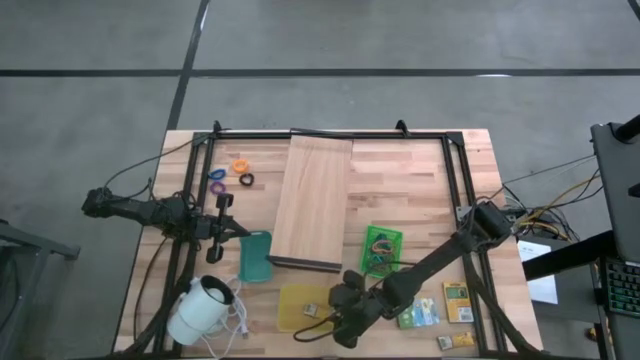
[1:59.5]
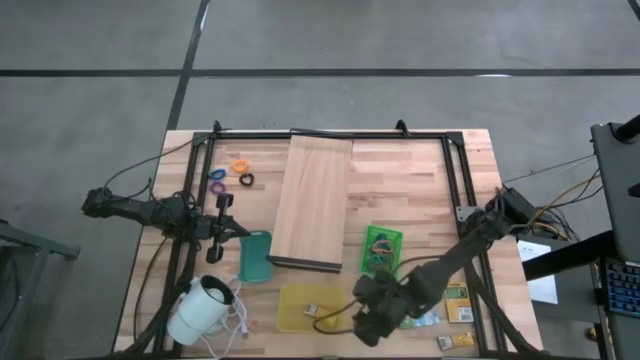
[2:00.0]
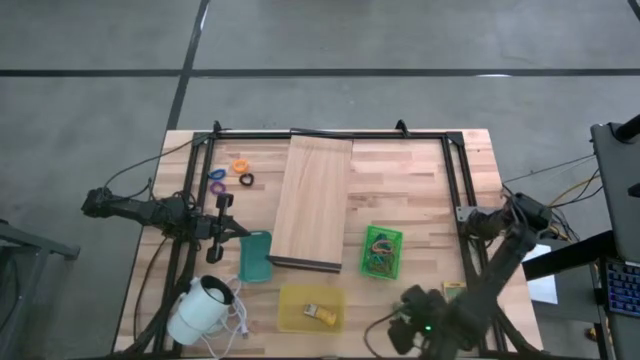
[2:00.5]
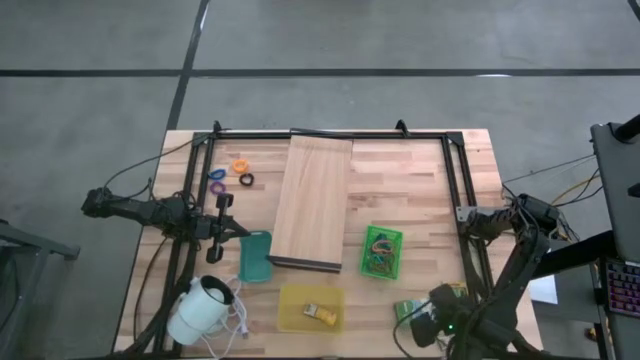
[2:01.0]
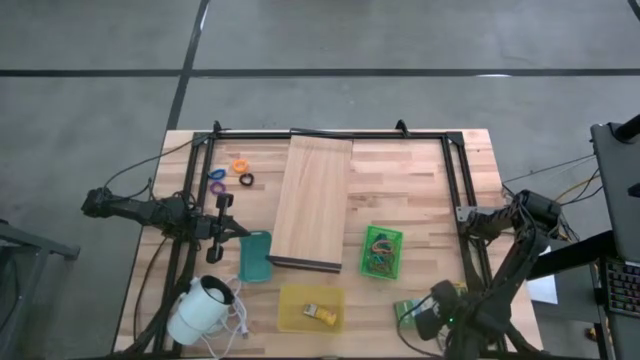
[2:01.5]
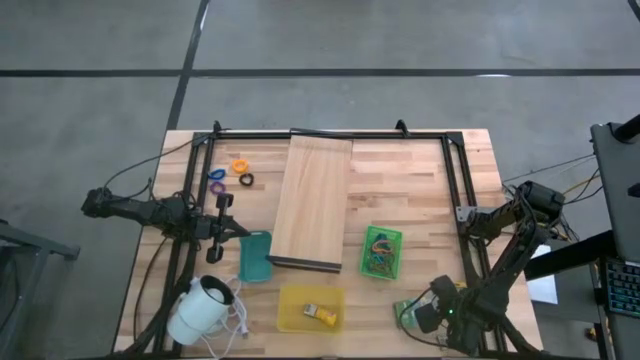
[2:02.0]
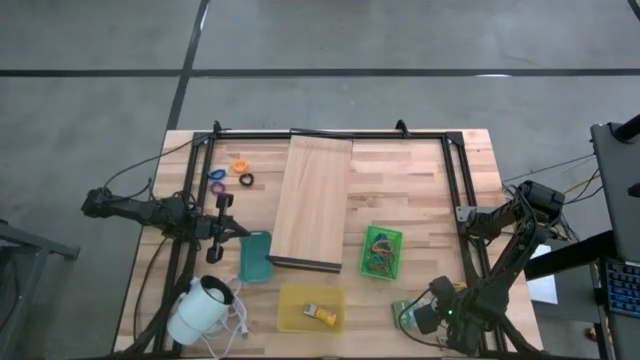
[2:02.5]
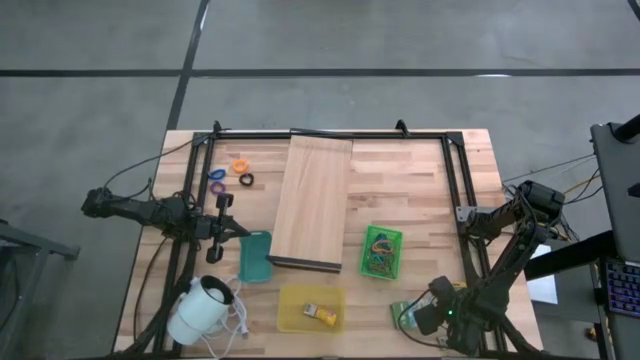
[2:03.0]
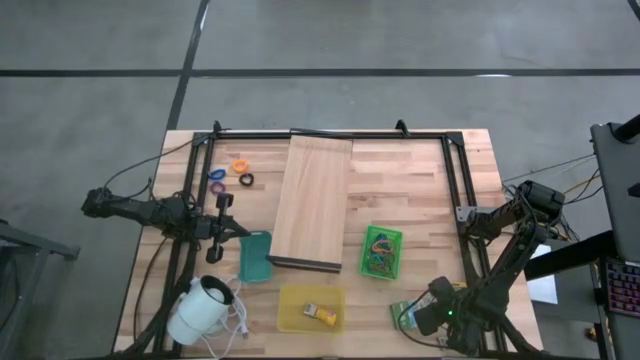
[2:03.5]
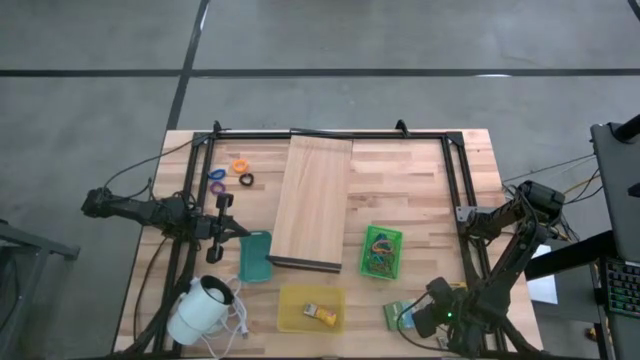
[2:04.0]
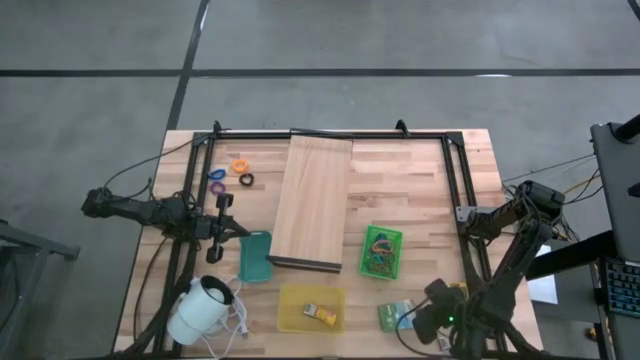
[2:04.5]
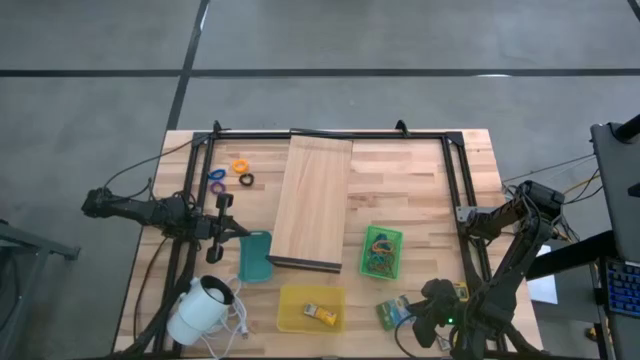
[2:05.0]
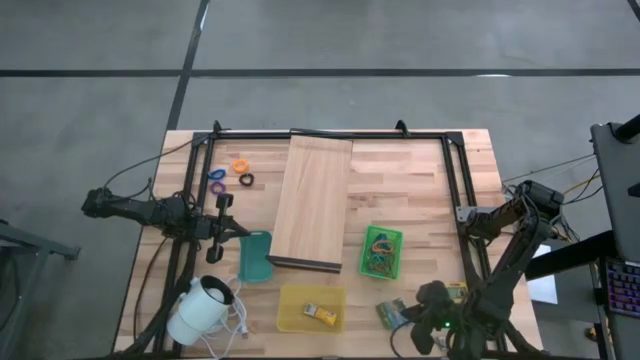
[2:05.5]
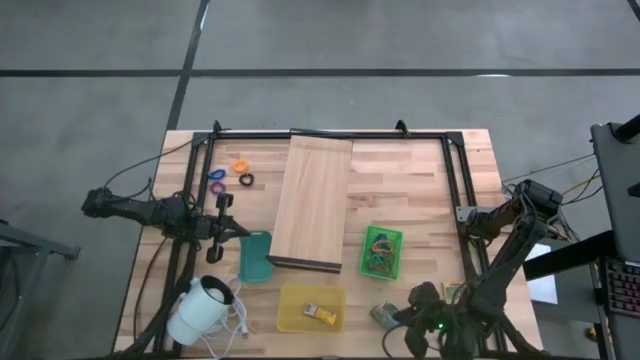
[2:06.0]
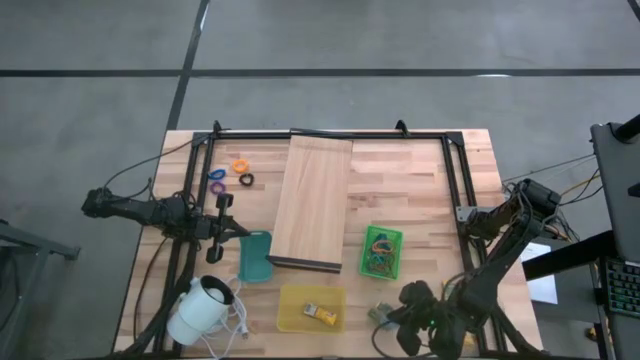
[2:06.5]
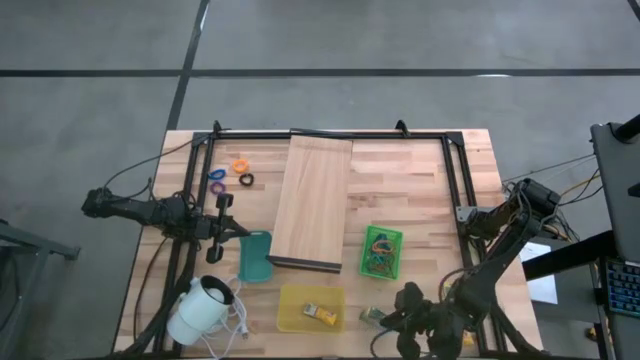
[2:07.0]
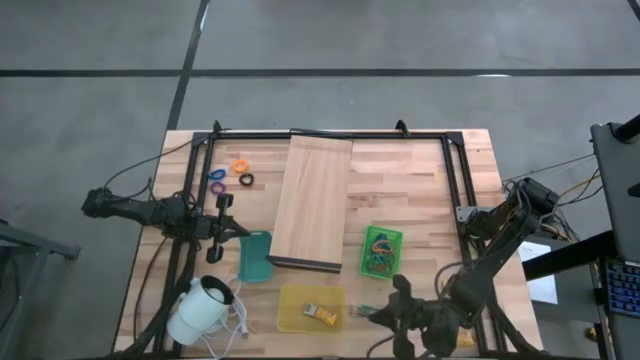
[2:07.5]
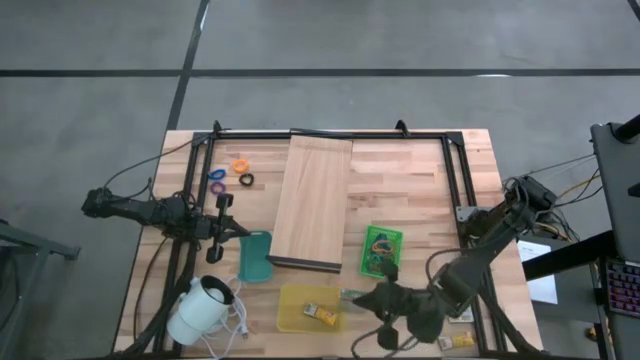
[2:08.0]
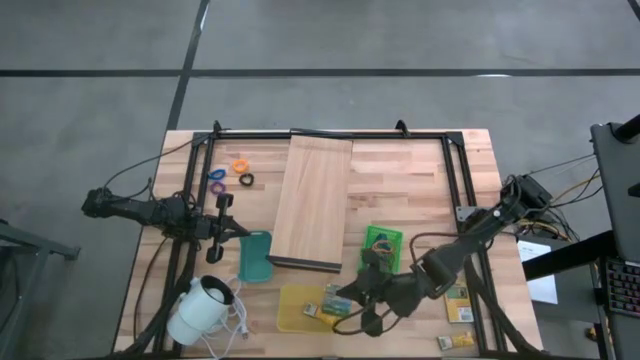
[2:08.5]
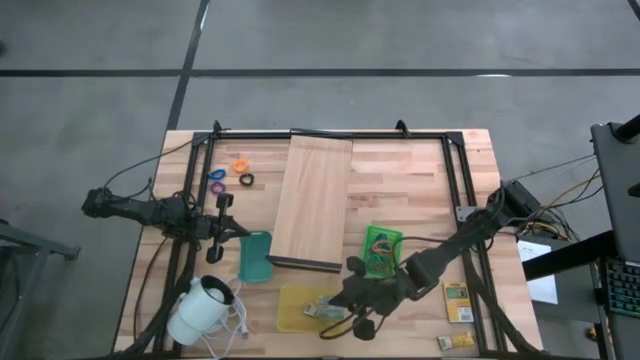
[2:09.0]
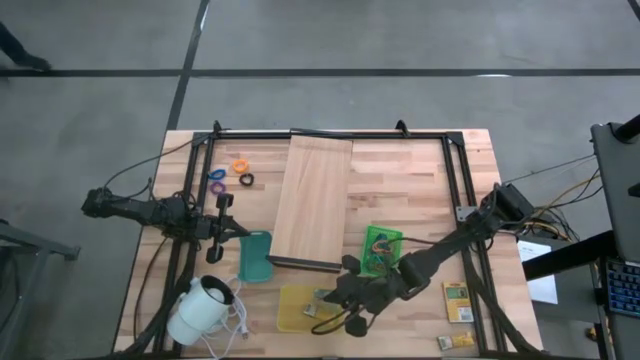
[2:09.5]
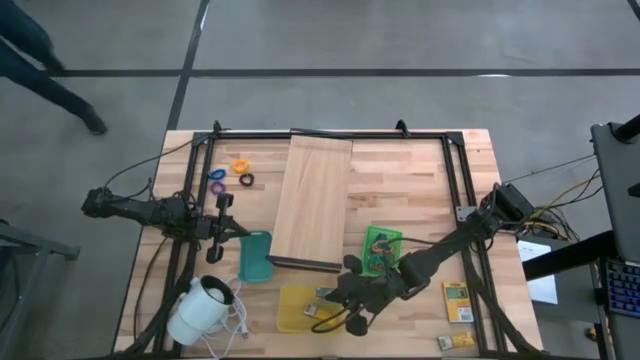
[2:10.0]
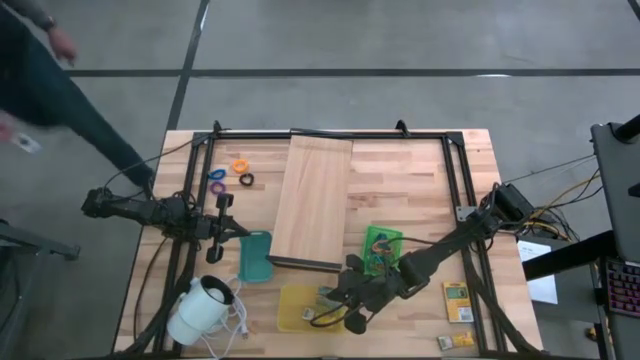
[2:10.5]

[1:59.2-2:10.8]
Task: Pick & Place Office Desk Supplies
Put the left large yellow crayon box into the yellow bin

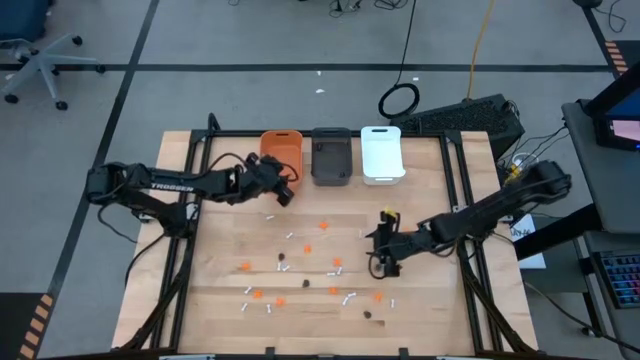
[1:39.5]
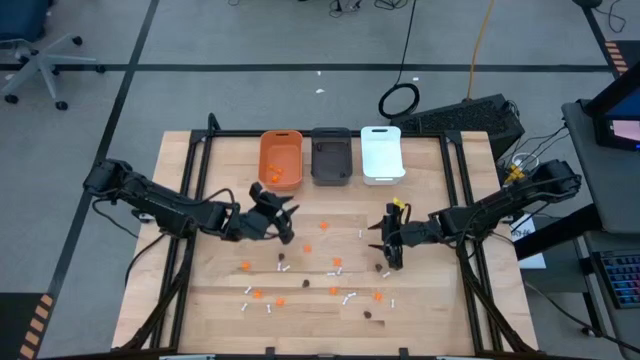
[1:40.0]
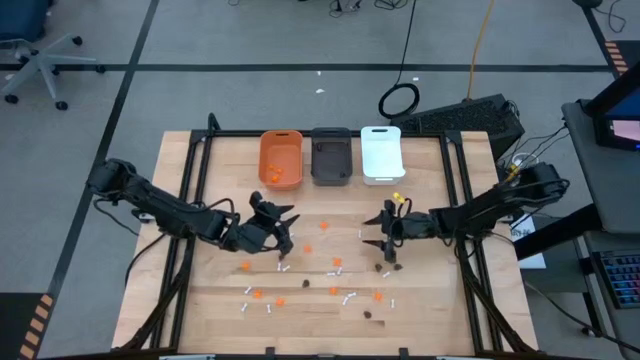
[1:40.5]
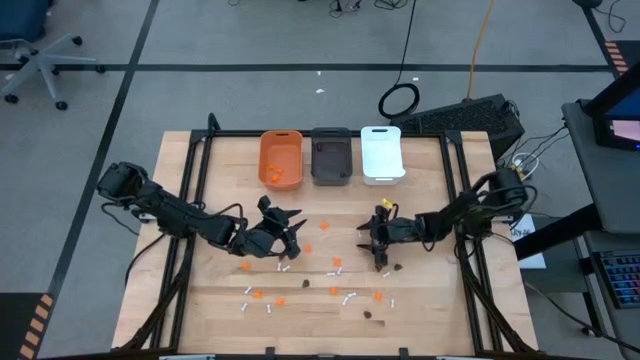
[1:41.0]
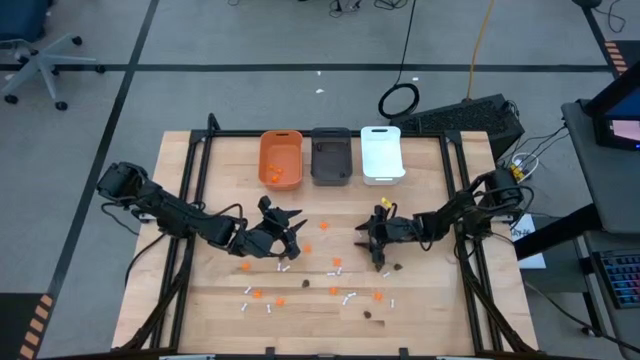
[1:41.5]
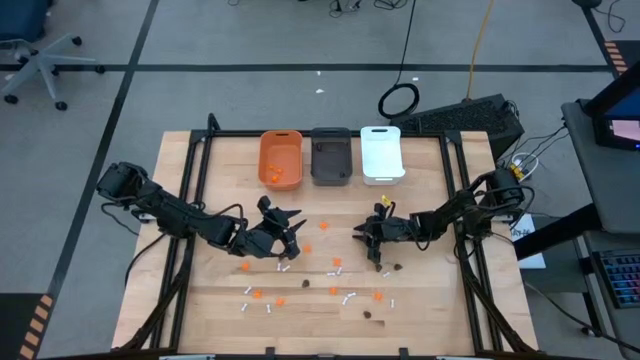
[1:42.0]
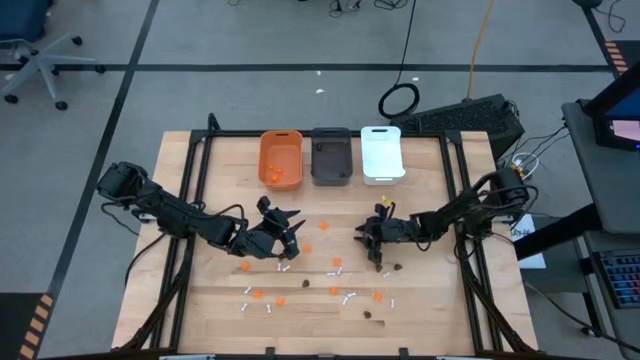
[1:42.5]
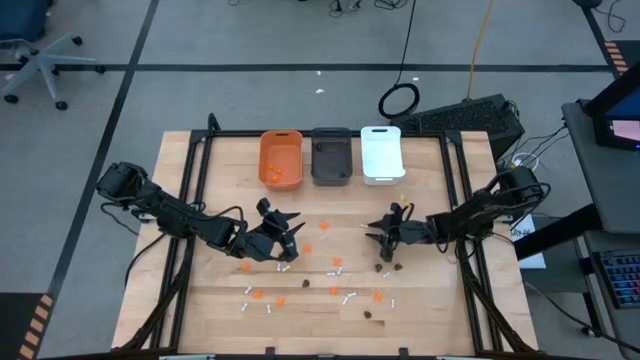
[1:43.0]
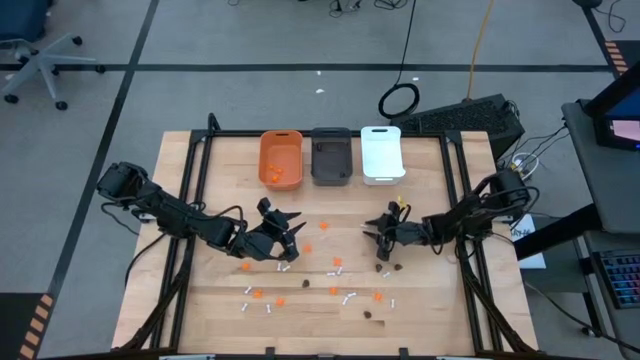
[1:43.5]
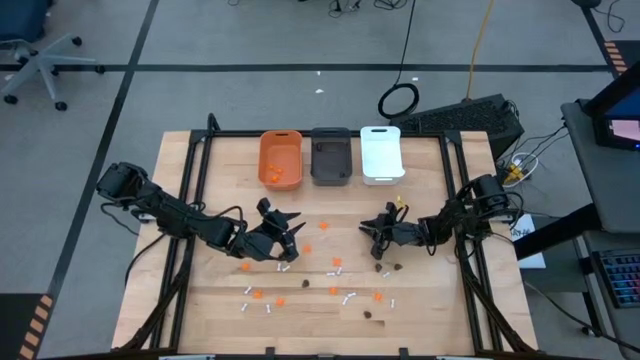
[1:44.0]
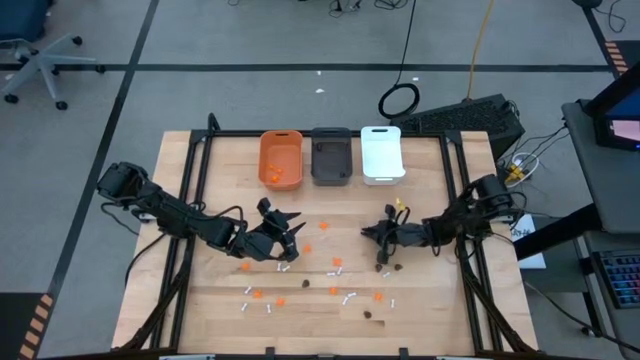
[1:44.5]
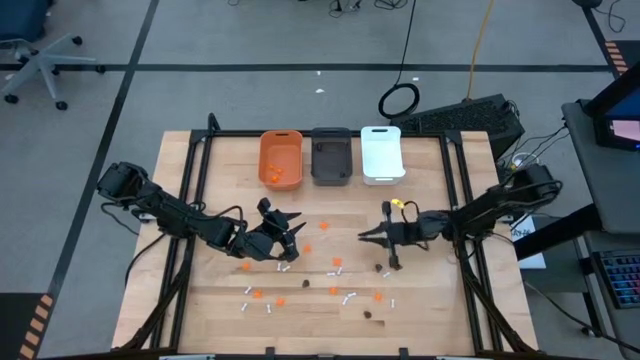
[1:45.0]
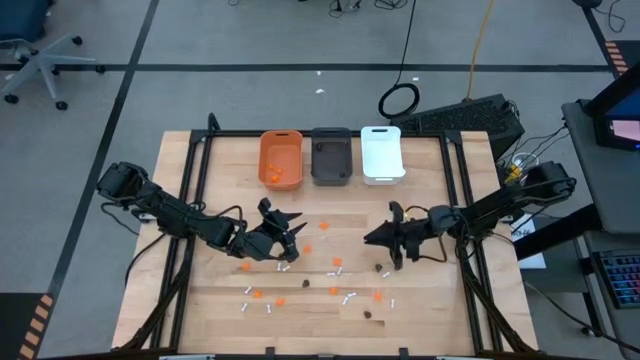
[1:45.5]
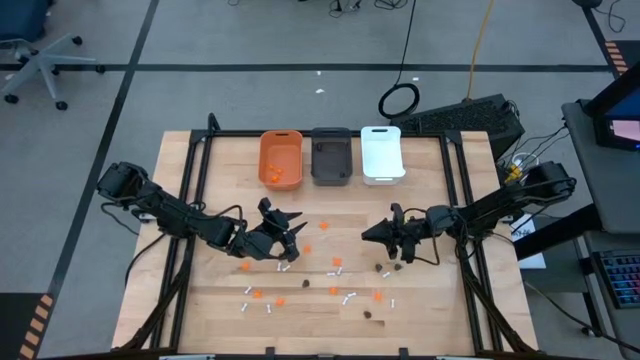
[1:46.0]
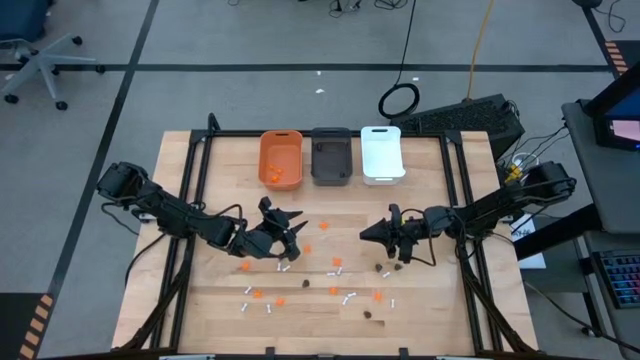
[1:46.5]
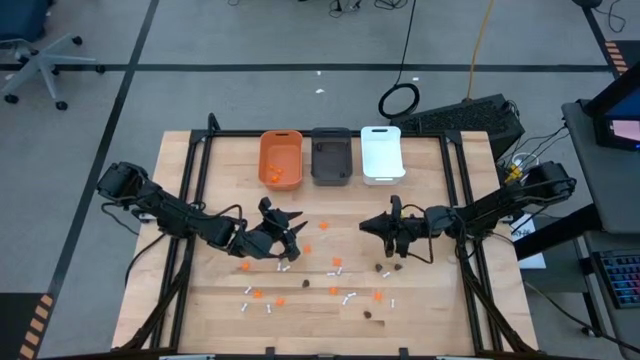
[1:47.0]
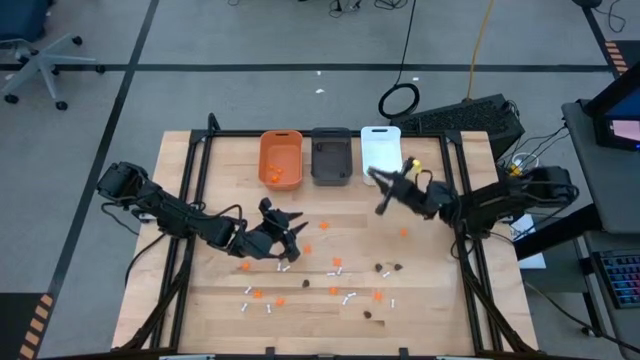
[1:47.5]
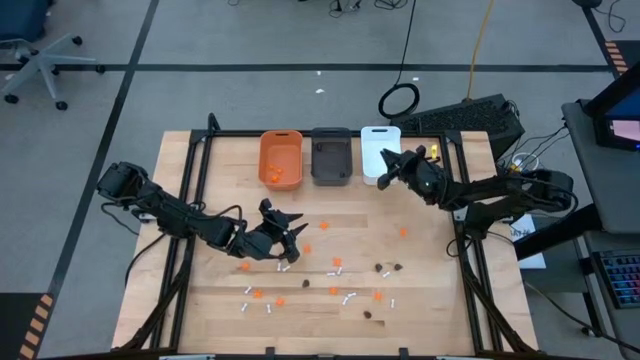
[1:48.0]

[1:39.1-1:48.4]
Task: Sort Halloween decoration
Put the white bone toy into the white bin

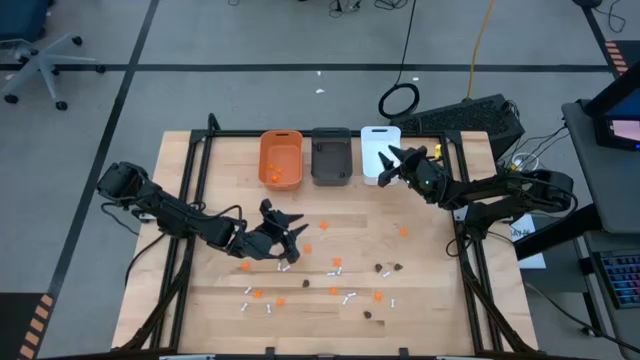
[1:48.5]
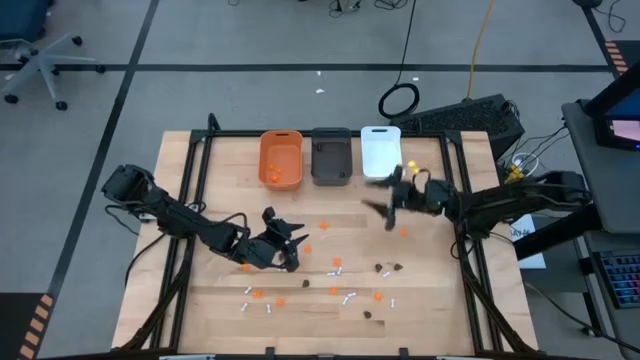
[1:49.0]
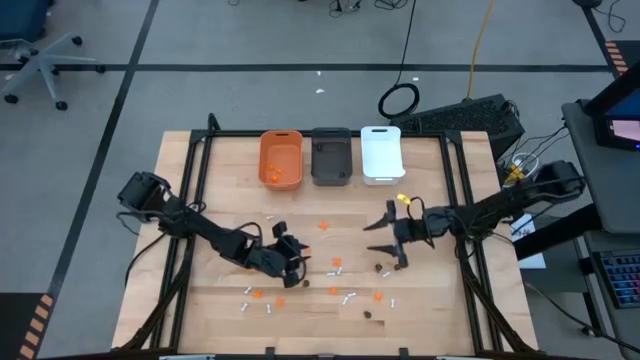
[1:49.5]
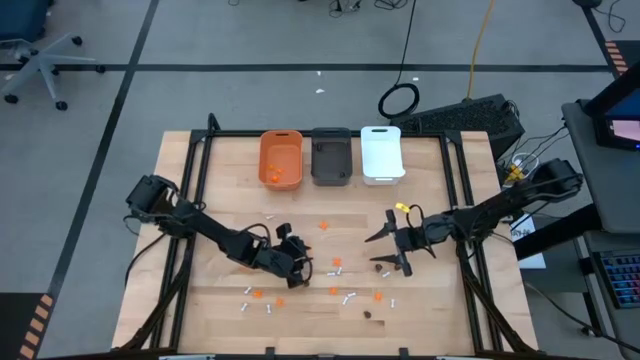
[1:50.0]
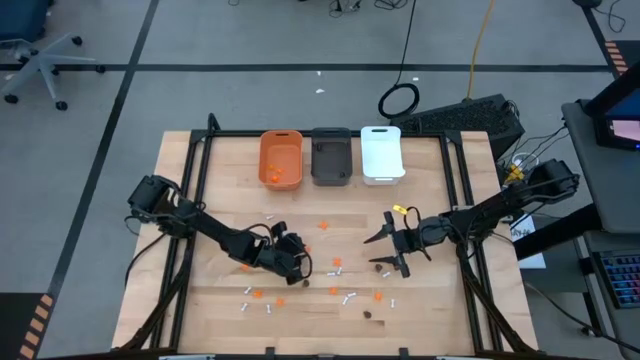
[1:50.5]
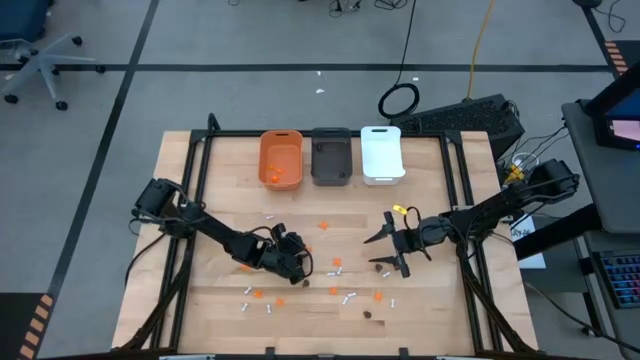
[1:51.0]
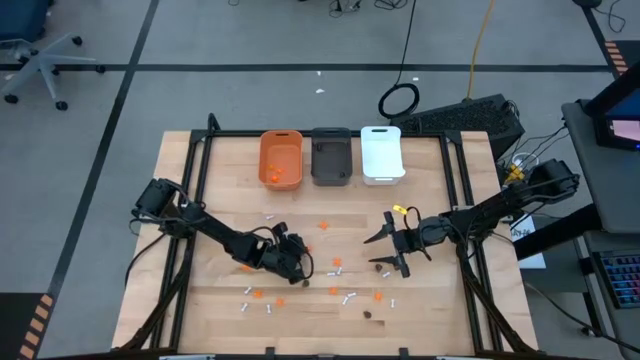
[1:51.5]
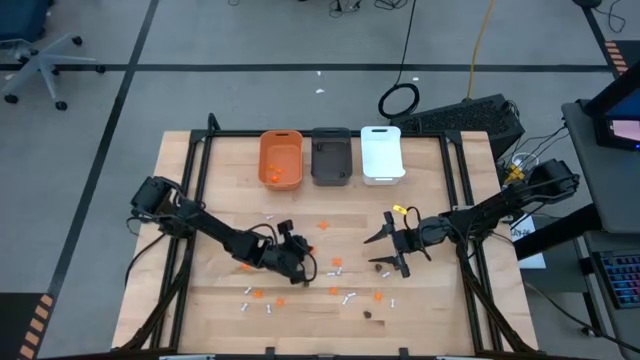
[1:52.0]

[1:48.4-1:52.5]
Put the orange spider toy into the orange bin
